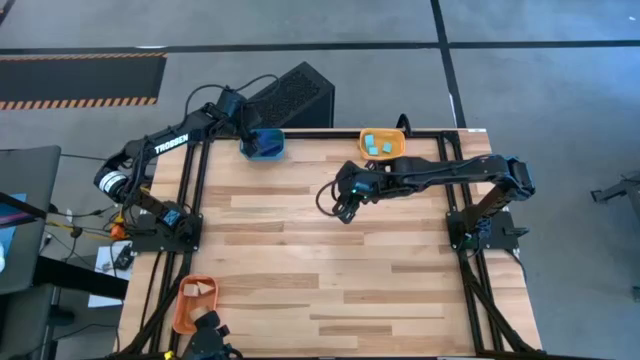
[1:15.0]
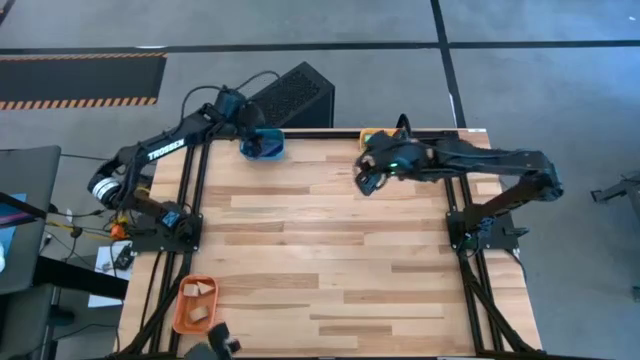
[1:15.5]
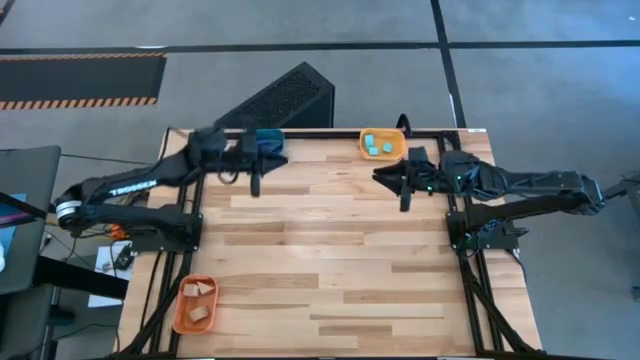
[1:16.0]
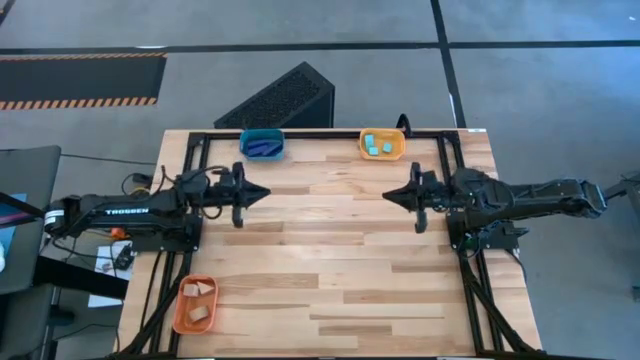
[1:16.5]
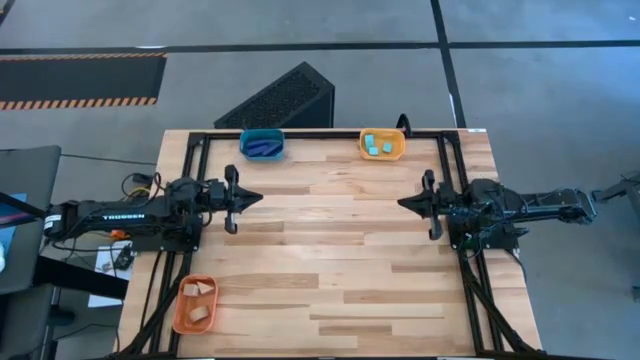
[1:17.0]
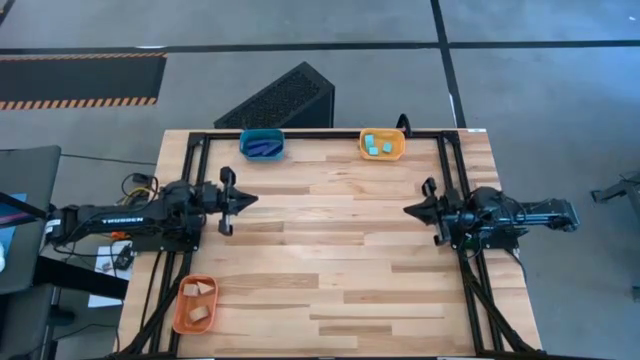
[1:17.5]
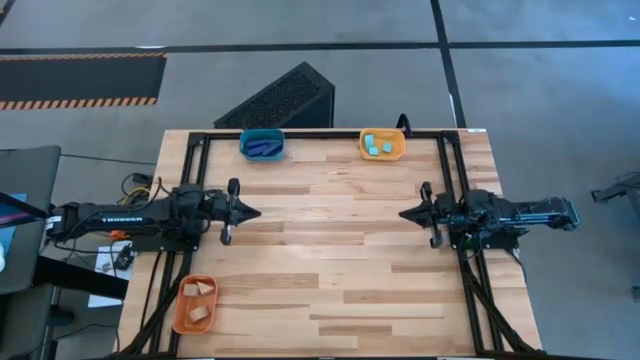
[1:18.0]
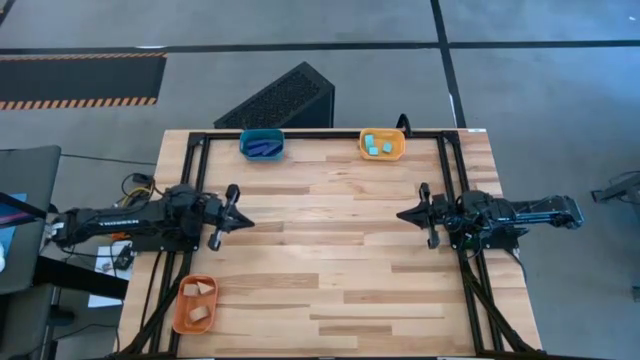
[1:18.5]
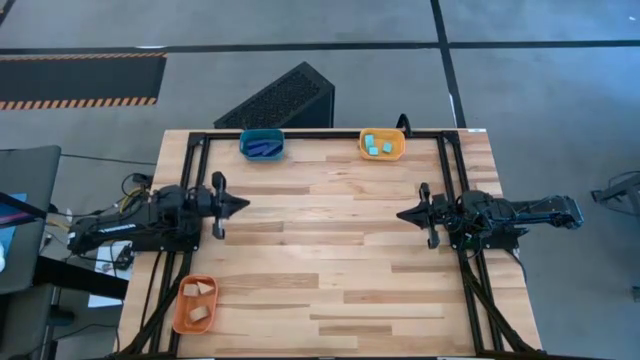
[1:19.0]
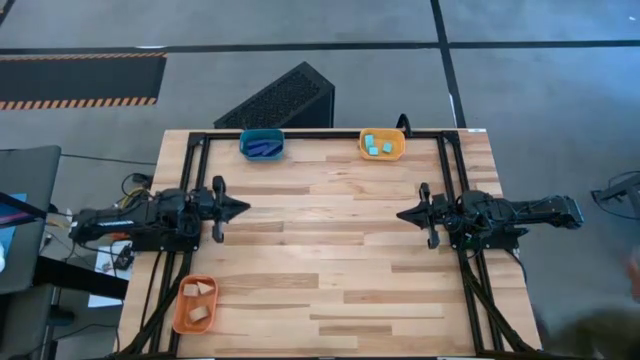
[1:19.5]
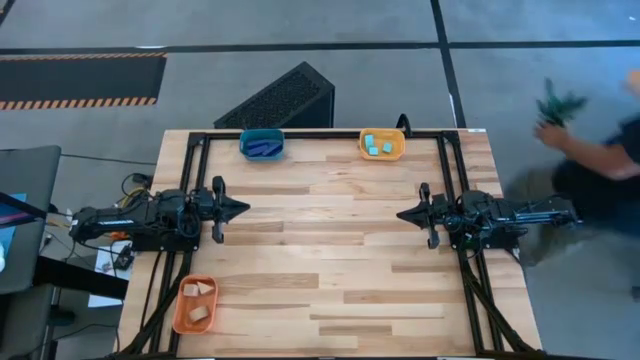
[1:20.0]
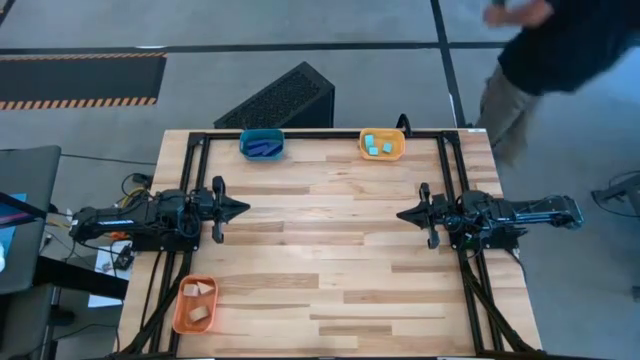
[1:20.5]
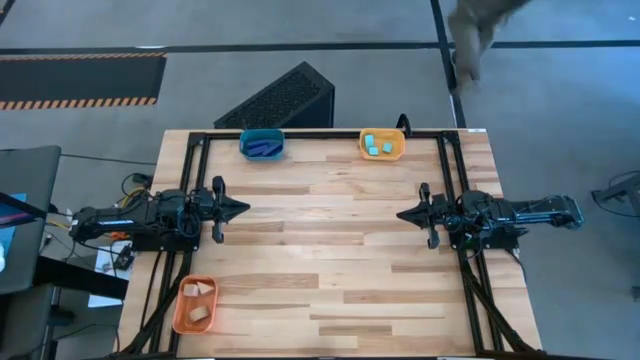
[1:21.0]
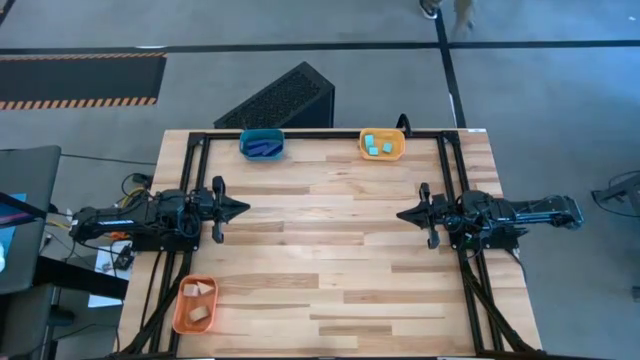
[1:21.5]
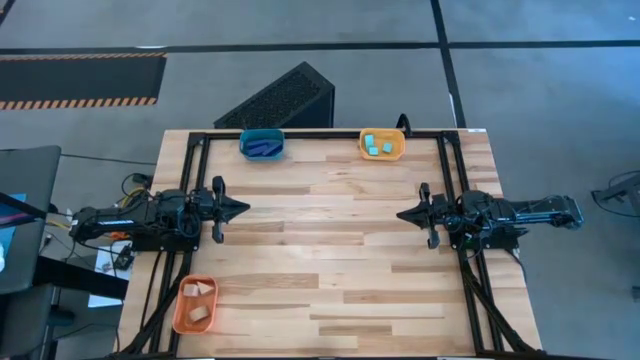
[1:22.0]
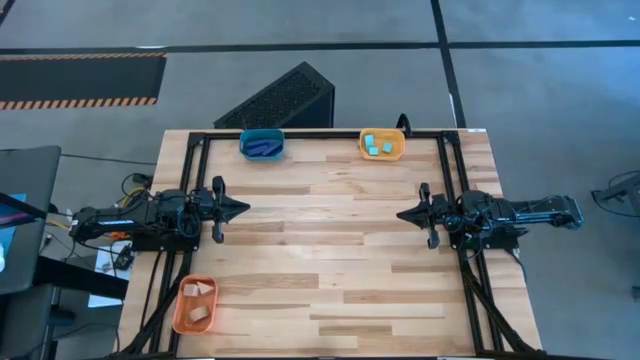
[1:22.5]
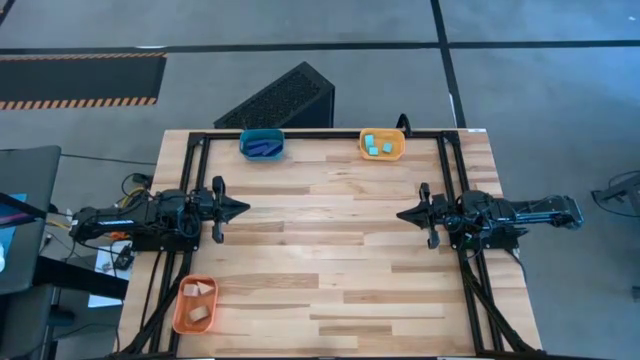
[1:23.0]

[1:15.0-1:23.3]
Task: Sort & place blocks by color
Return to Home Position

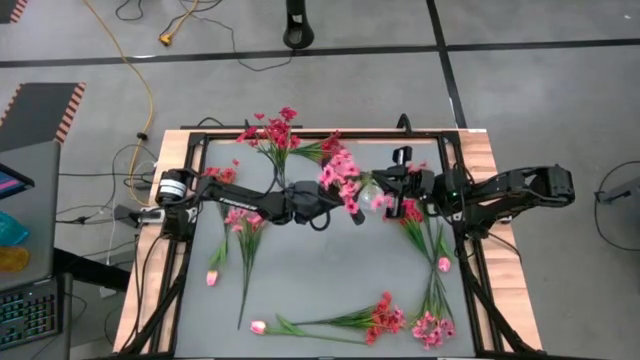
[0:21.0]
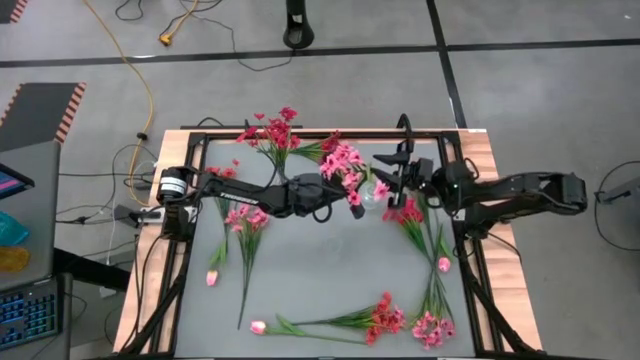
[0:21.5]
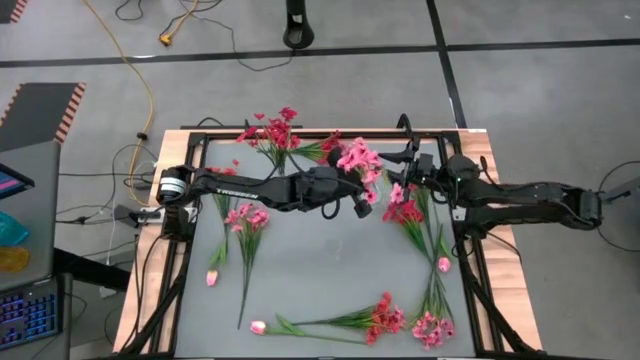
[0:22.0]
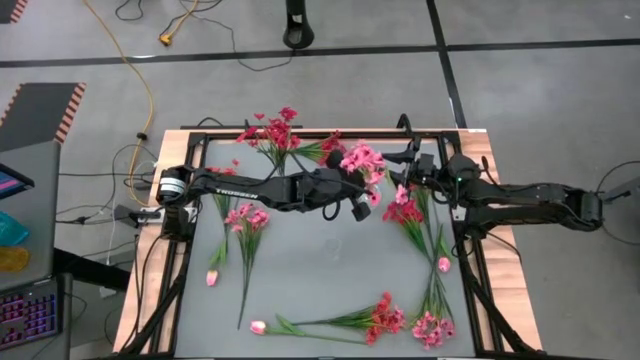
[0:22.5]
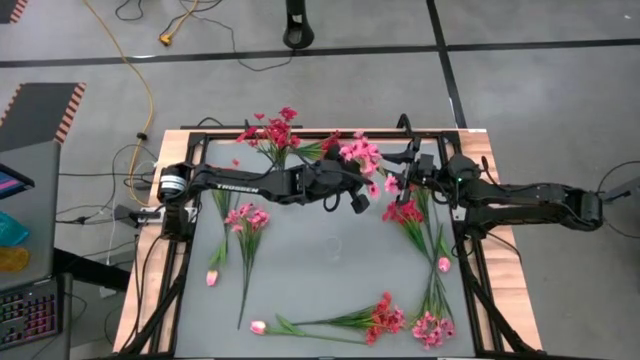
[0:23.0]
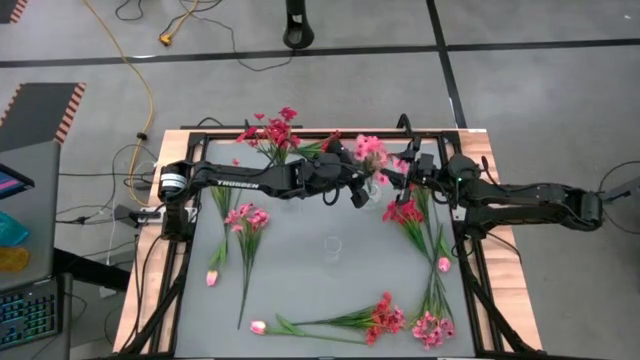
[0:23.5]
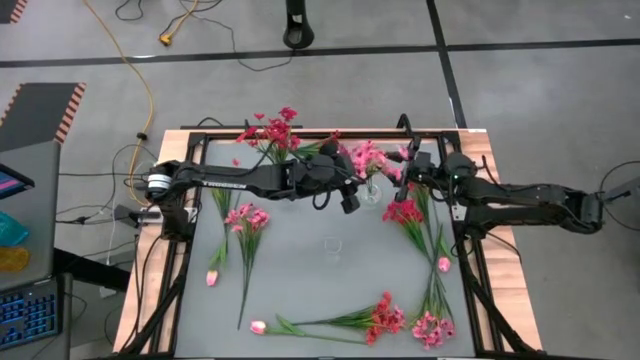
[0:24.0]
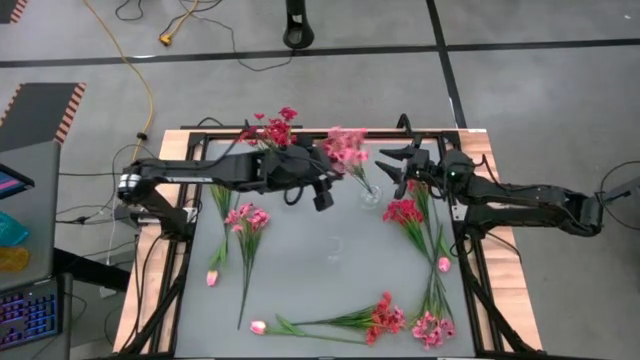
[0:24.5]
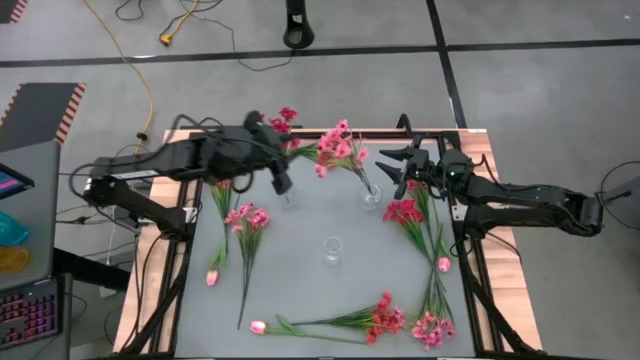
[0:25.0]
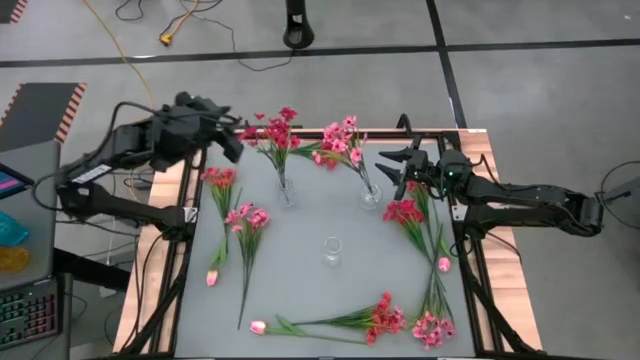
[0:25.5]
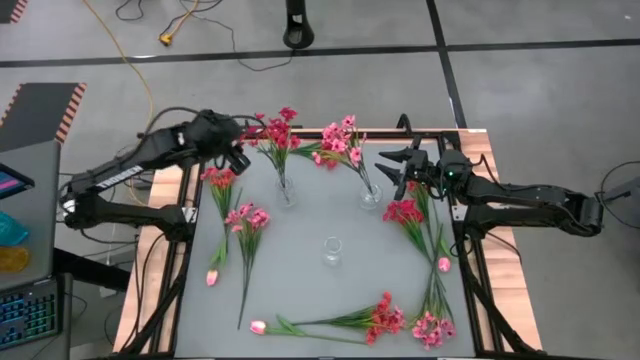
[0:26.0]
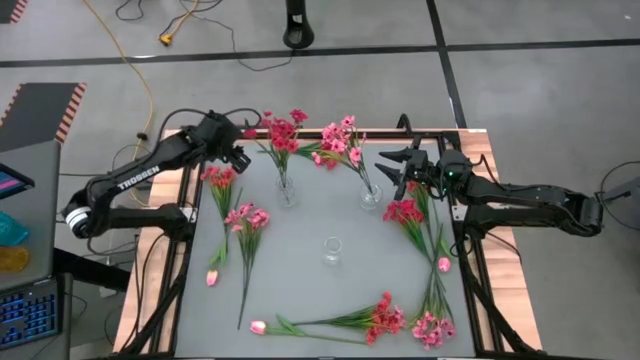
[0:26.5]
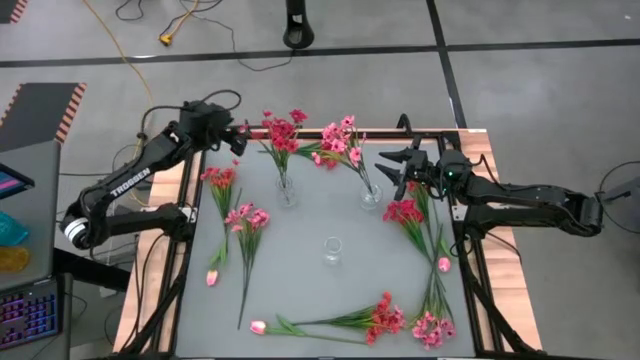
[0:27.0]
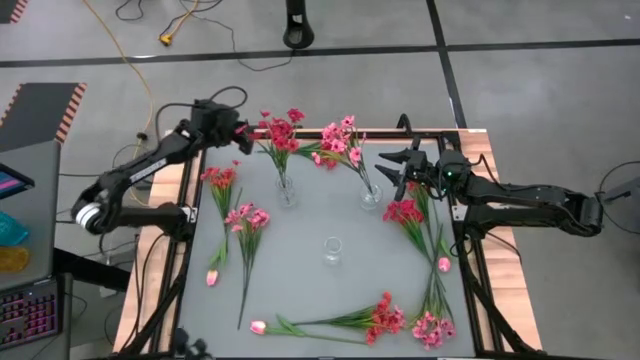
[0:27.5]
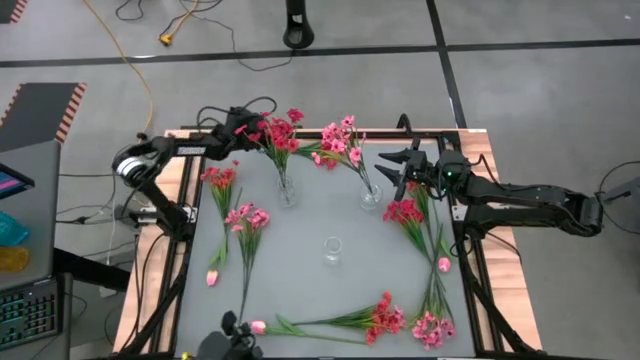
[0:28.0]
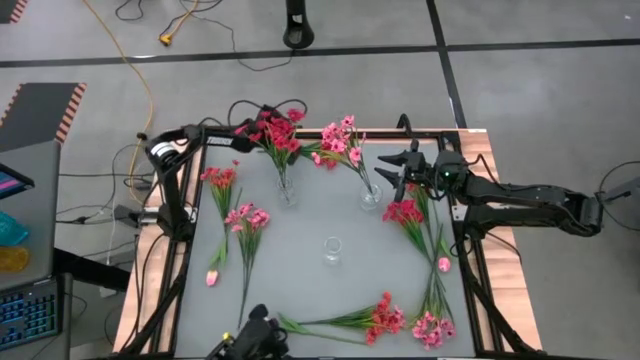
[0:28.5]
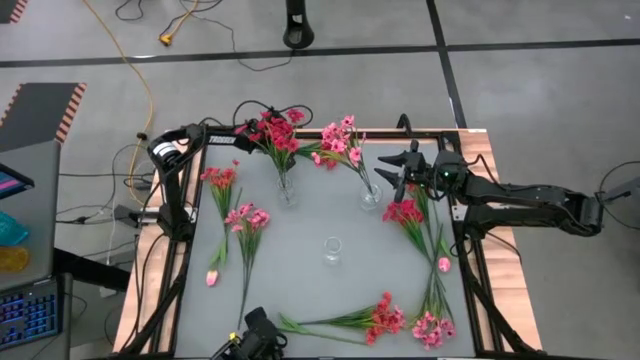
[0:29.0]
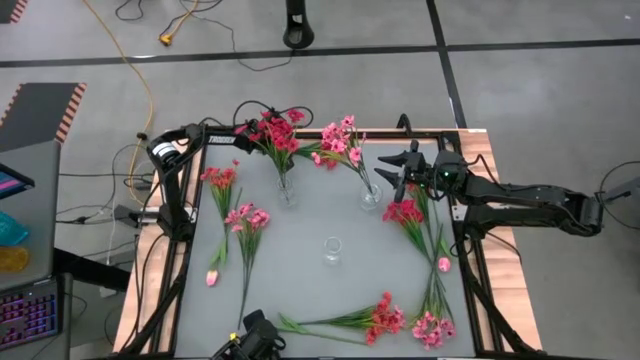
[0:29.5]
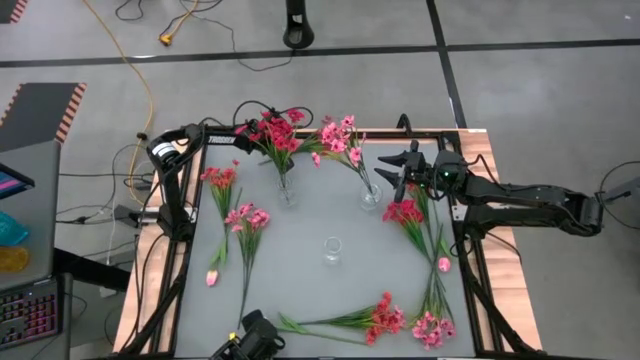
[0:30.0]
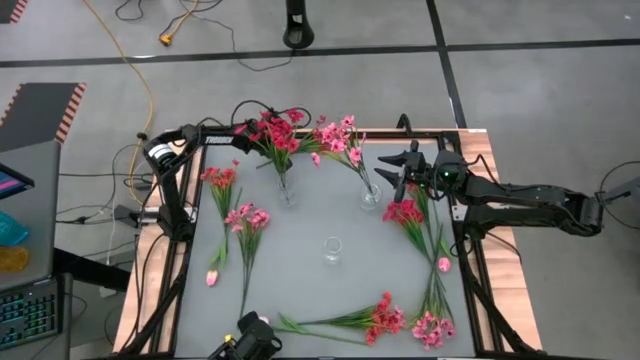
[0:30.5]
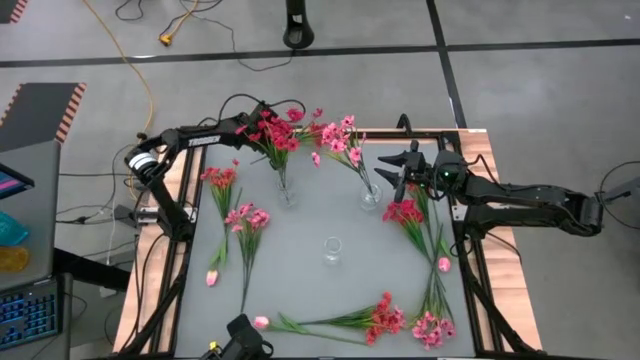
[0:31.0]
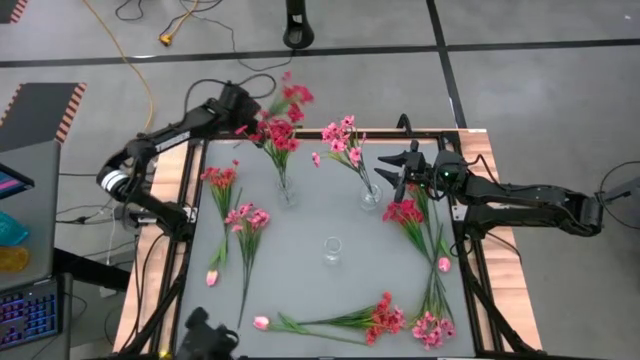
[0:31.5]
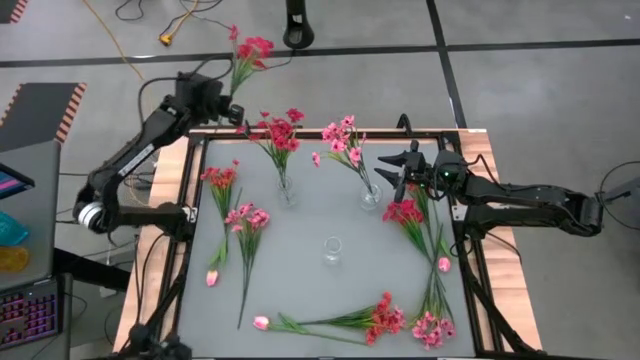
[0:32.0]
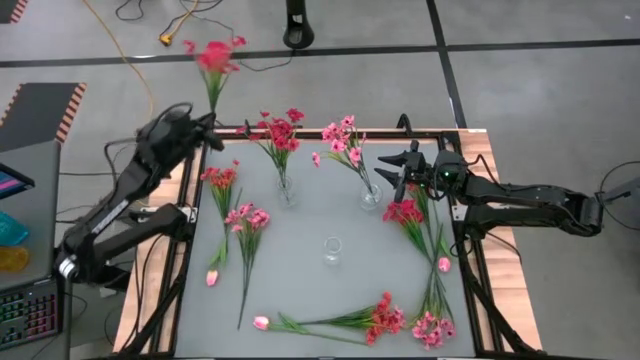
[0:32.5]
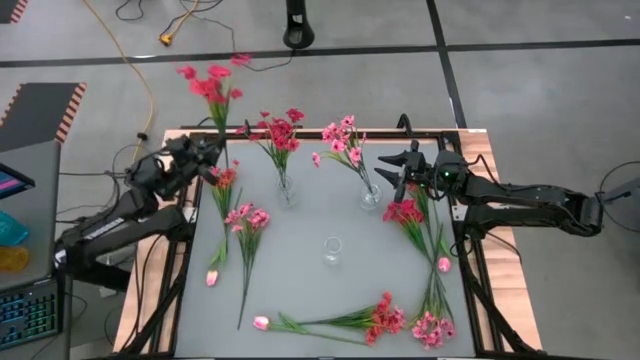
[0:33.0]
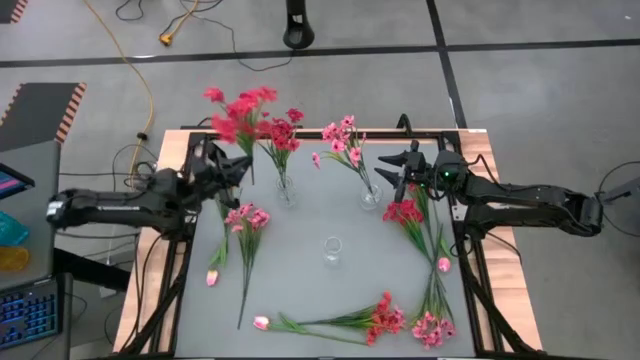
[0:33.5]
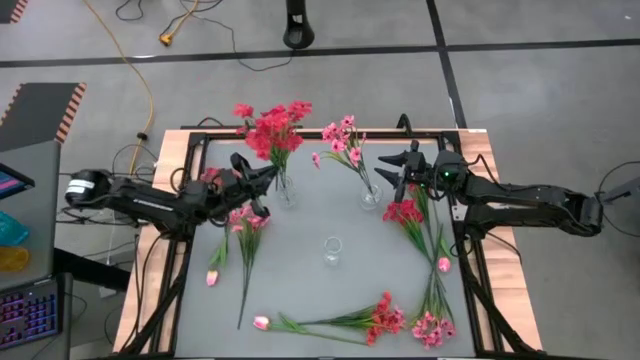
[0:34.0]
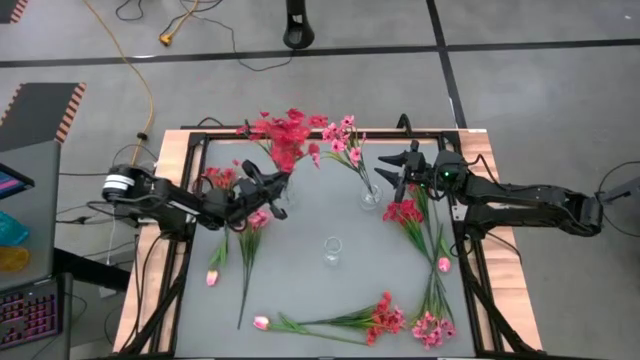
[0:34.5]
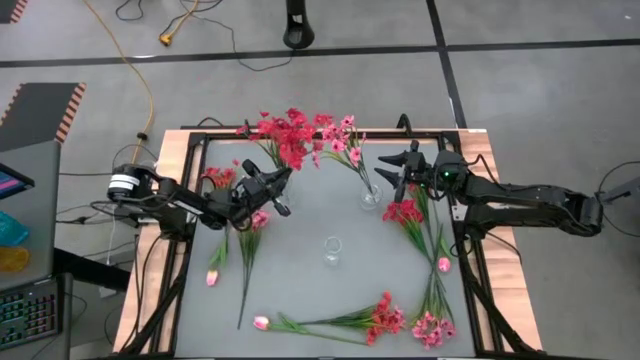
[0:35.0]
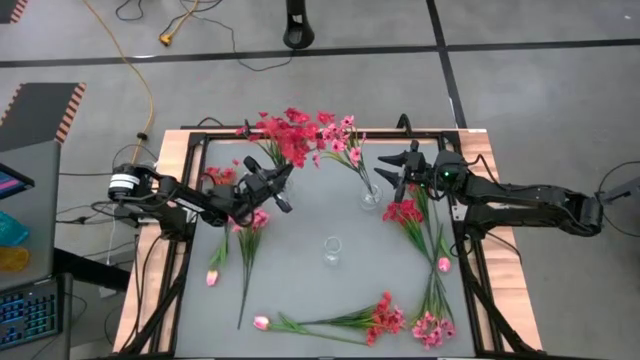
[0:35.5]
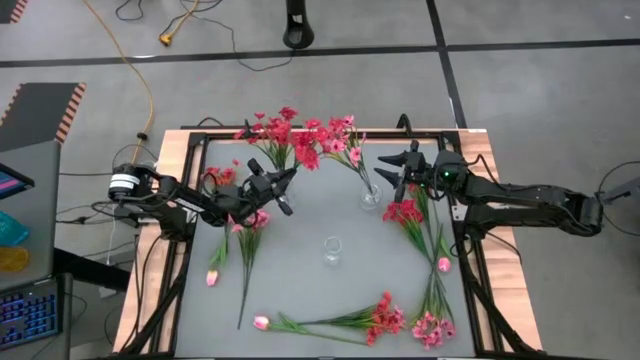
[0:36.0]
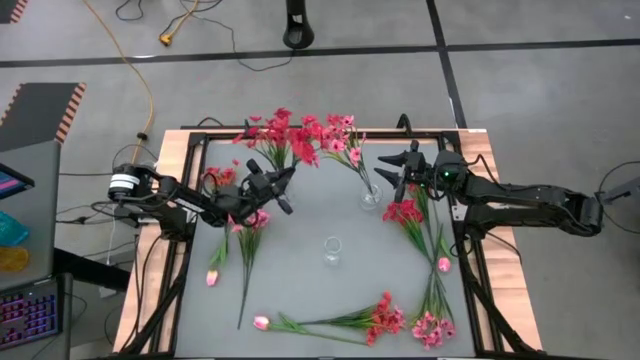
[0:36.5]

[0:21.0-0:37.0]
Task: Sort flowers into vase by color
Put the top left red flowers into the top left transparent vase
